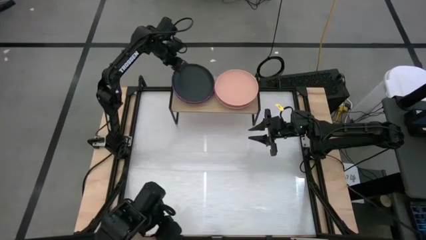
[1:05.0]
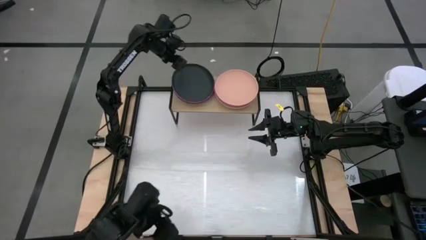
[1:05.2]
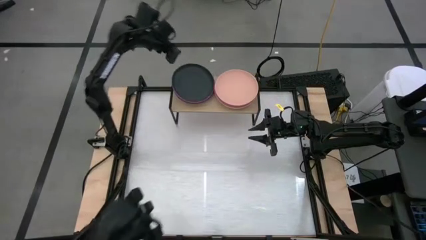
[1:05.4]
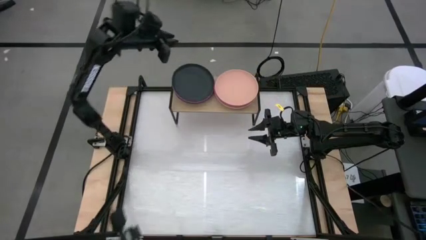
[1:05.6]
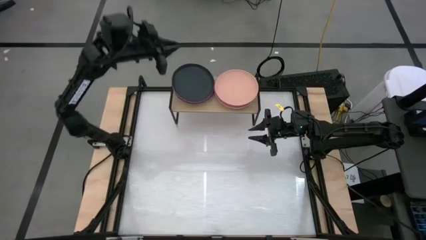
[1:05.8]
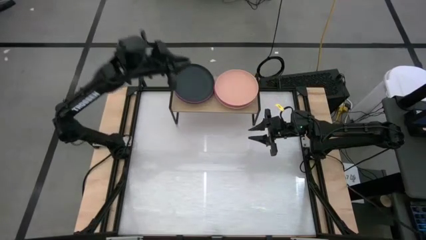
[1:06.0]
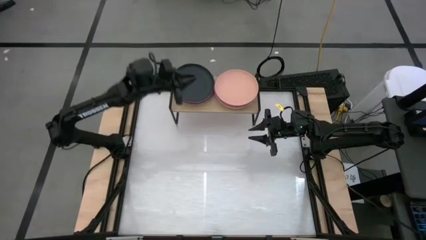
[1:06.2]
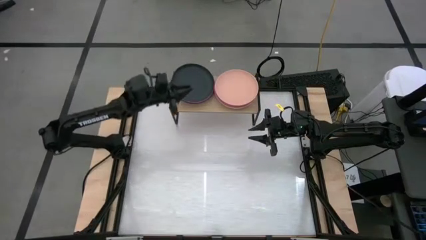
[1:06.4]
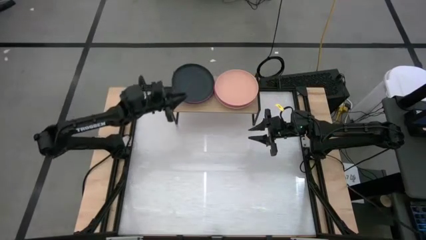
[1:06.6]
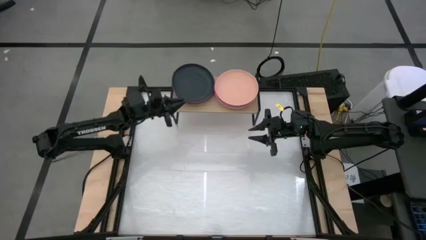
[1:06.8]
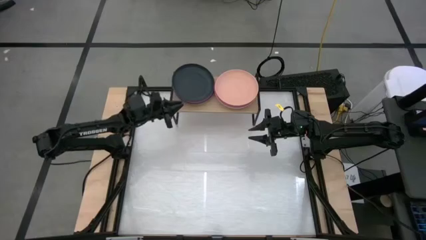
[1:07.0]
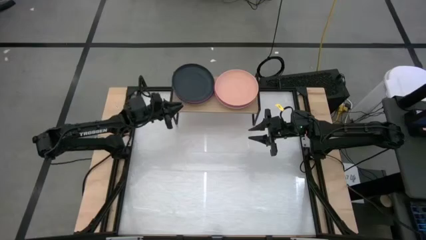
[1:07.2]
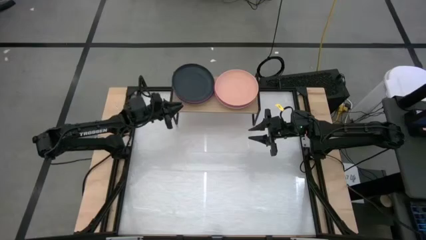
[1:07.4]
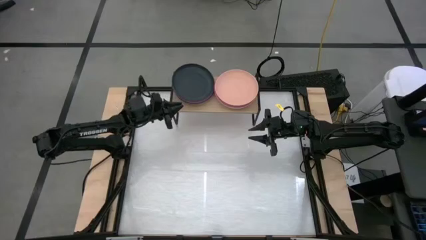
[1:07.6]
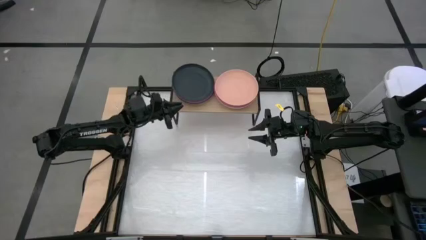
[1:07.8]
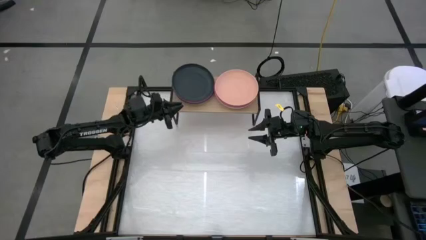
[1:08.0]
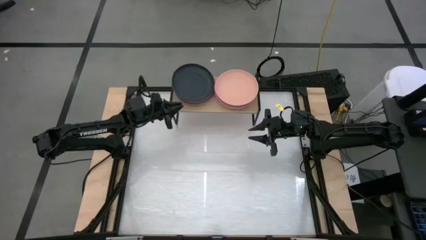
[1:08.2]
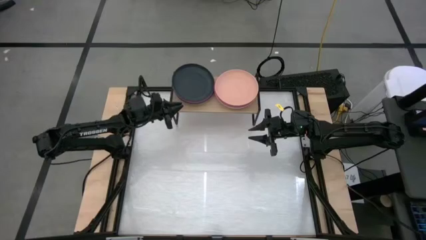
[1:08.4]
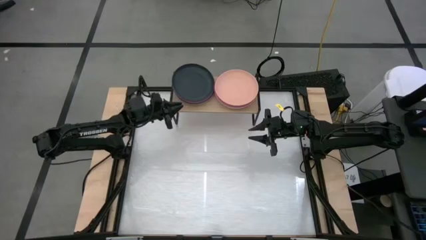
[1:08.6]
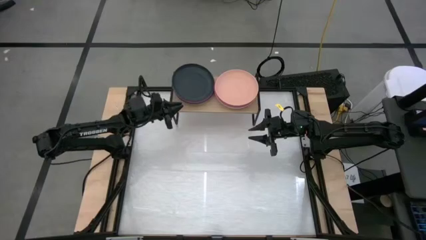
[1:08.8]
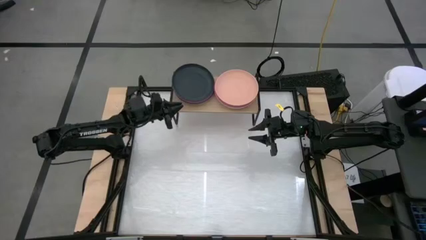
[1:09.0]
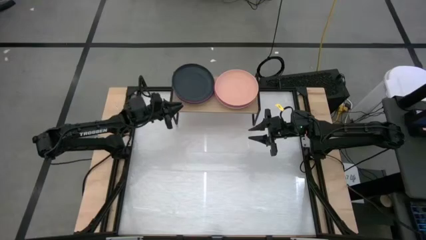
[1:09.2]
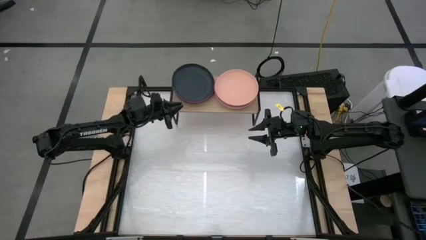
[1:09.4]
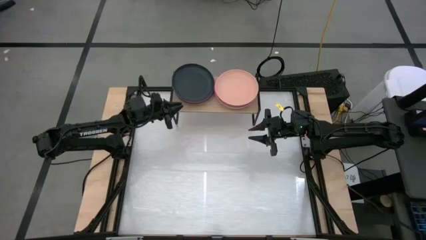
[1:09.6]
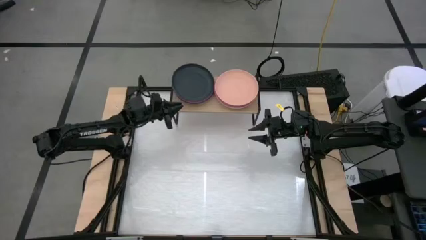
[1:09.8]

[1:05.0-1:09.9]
Task: Place and stack plates onto a shelf
Return to Home Position

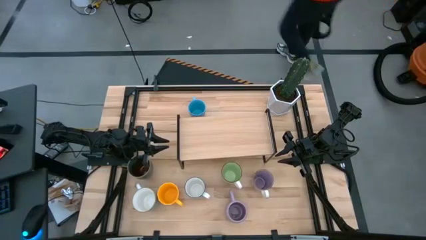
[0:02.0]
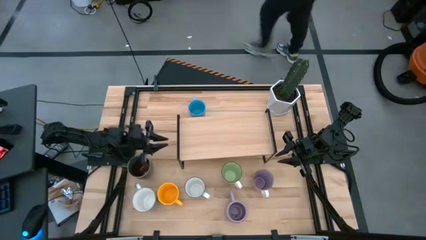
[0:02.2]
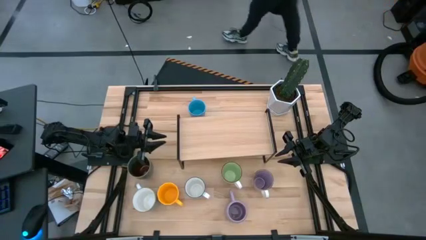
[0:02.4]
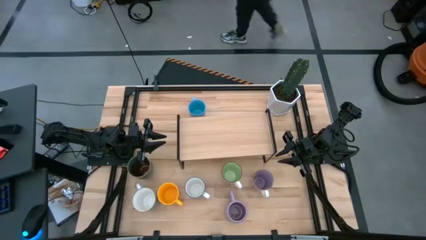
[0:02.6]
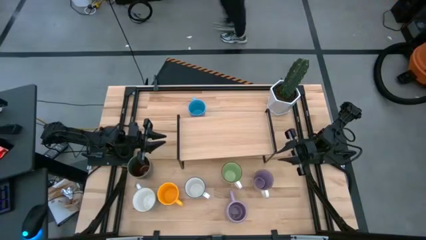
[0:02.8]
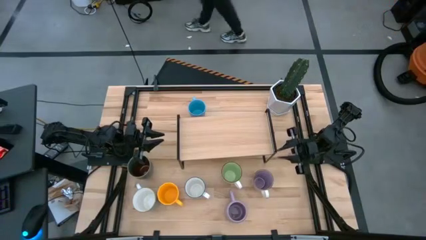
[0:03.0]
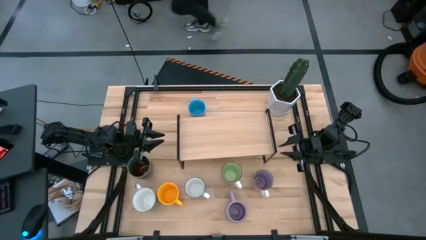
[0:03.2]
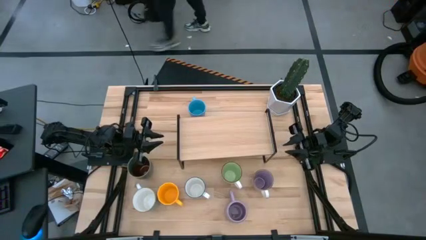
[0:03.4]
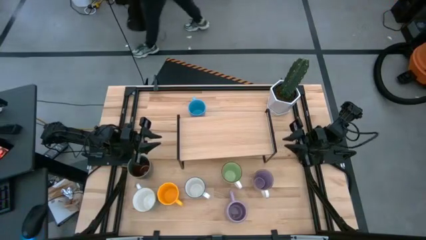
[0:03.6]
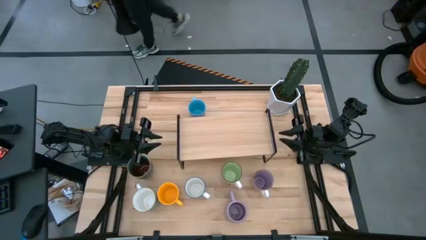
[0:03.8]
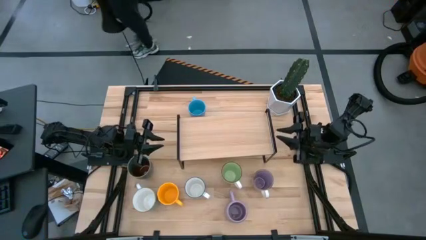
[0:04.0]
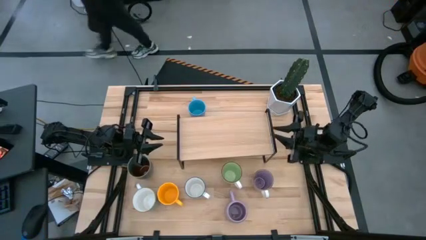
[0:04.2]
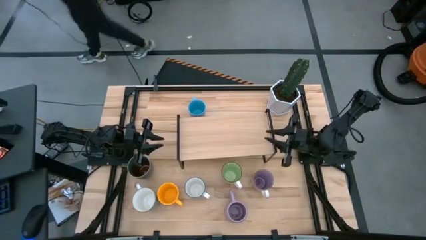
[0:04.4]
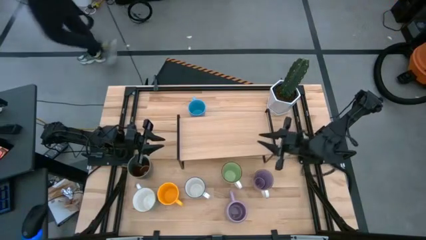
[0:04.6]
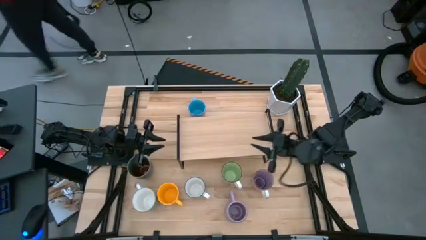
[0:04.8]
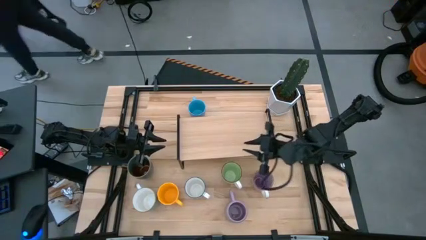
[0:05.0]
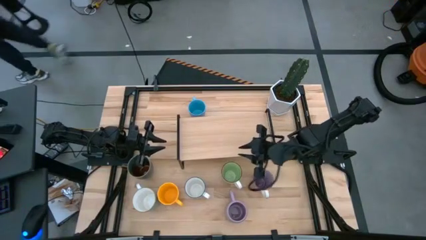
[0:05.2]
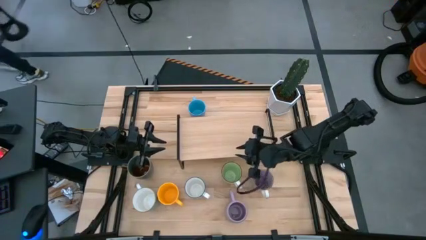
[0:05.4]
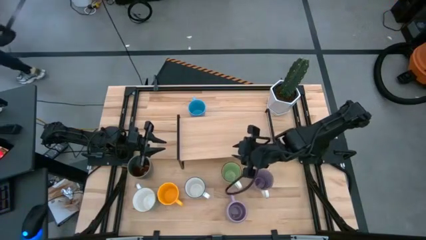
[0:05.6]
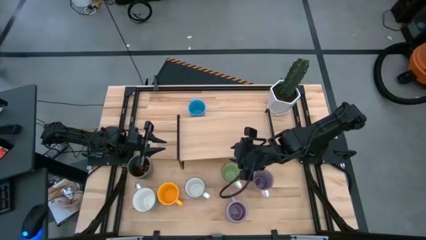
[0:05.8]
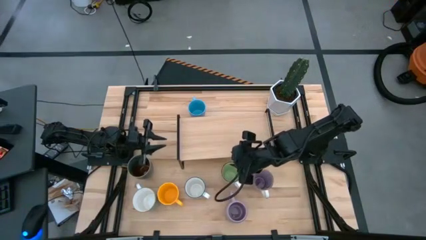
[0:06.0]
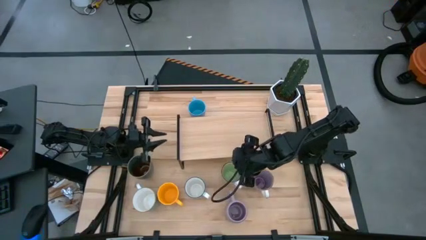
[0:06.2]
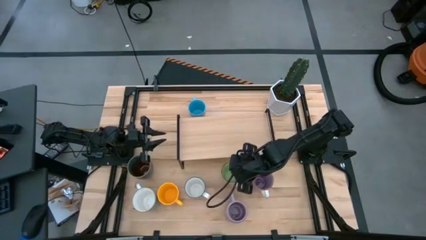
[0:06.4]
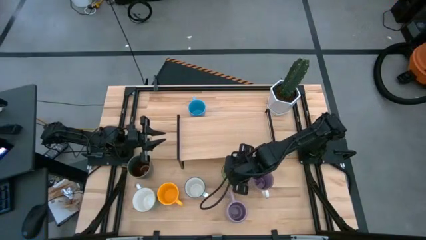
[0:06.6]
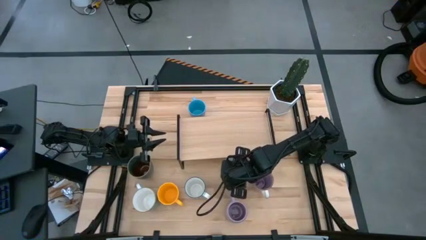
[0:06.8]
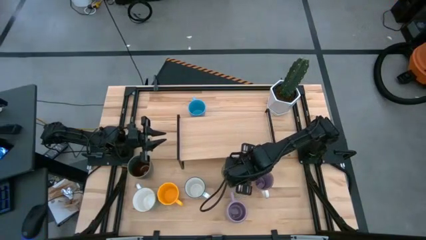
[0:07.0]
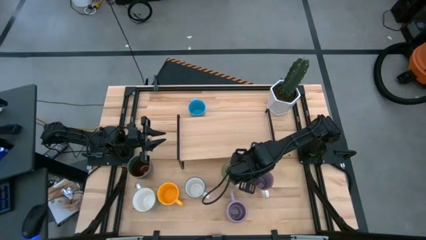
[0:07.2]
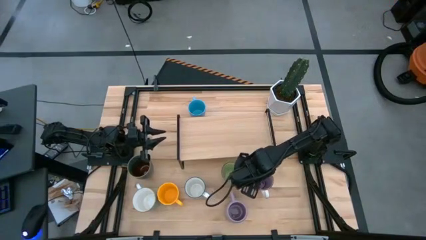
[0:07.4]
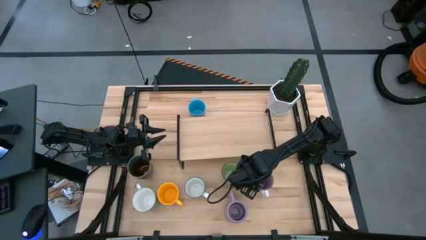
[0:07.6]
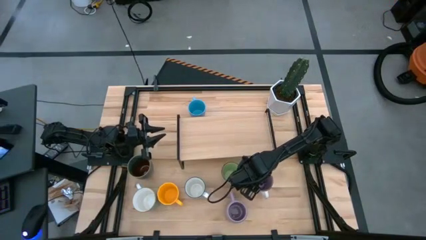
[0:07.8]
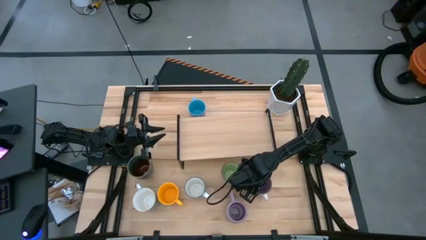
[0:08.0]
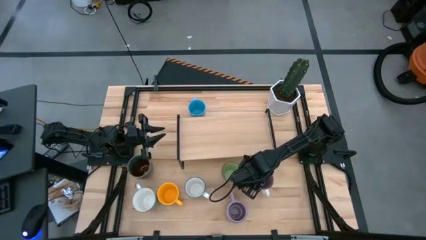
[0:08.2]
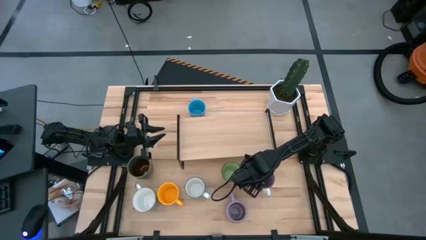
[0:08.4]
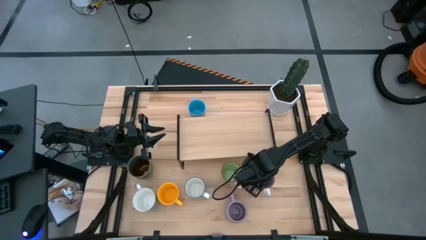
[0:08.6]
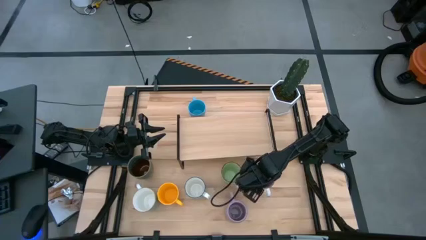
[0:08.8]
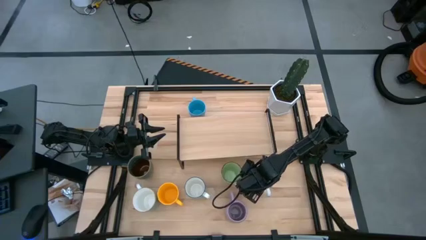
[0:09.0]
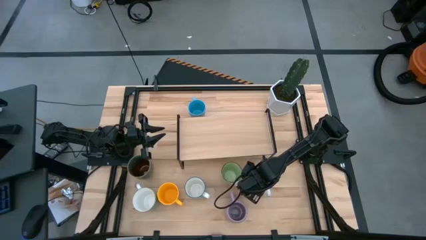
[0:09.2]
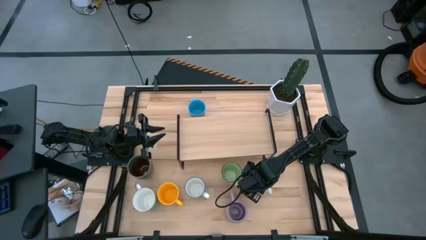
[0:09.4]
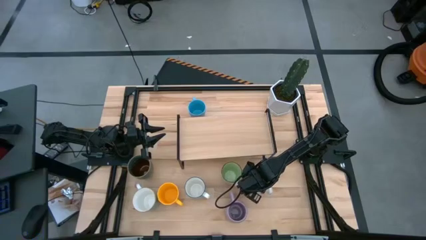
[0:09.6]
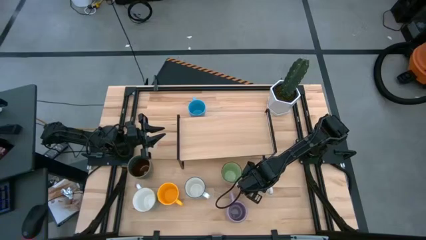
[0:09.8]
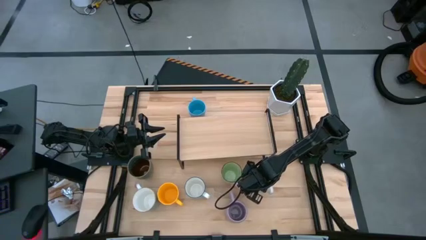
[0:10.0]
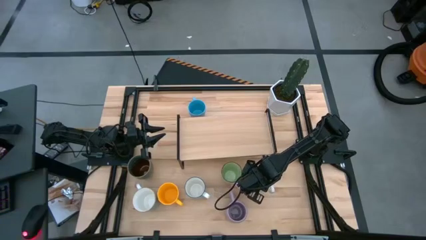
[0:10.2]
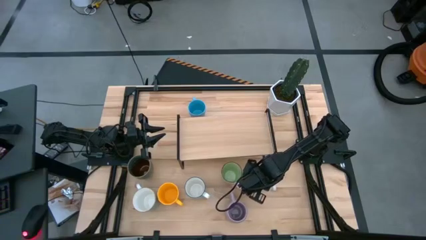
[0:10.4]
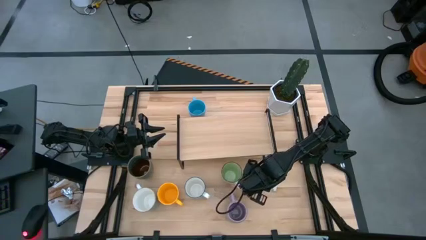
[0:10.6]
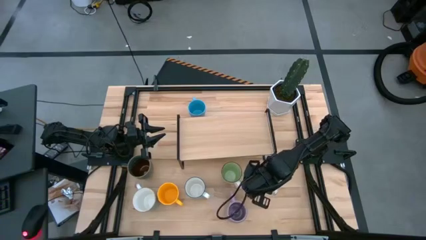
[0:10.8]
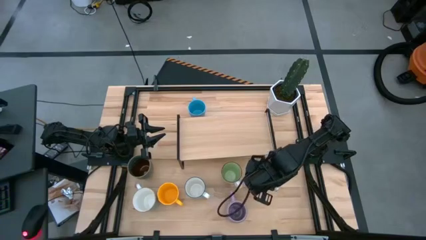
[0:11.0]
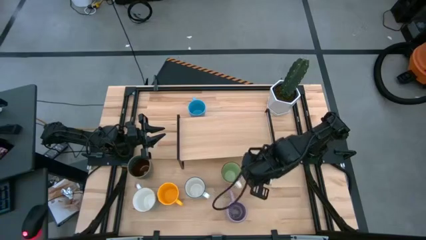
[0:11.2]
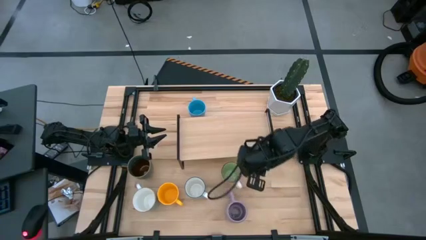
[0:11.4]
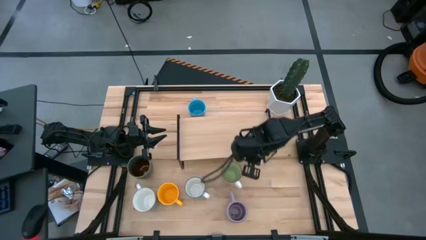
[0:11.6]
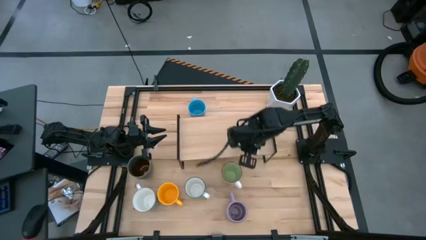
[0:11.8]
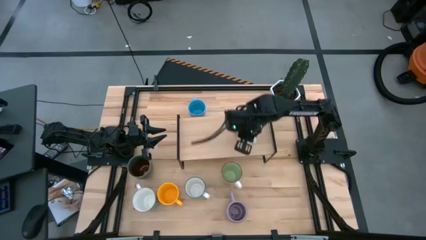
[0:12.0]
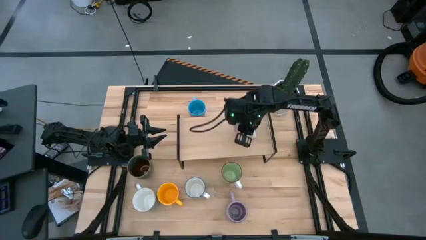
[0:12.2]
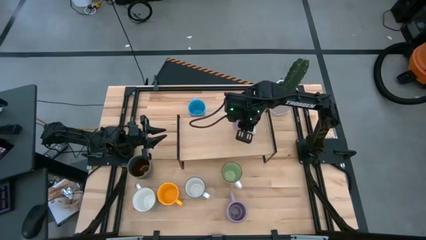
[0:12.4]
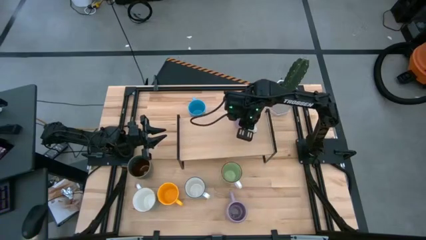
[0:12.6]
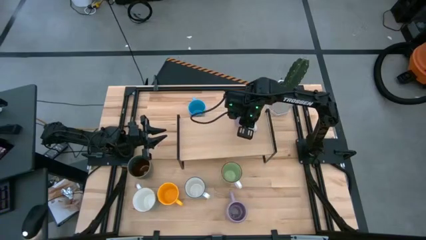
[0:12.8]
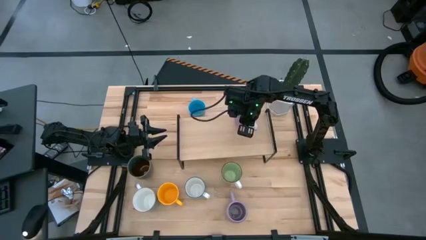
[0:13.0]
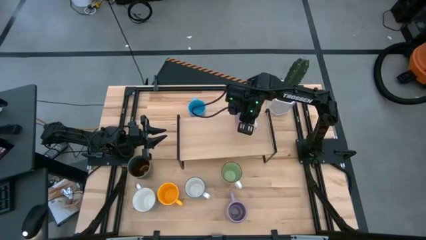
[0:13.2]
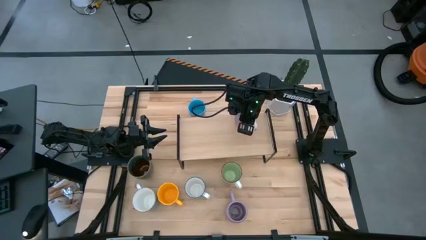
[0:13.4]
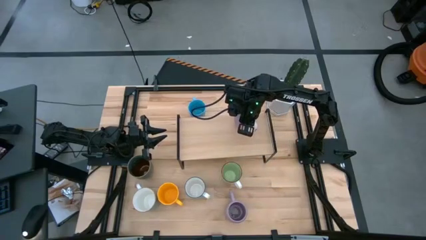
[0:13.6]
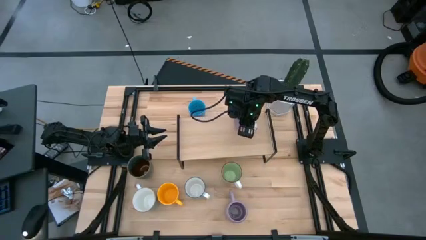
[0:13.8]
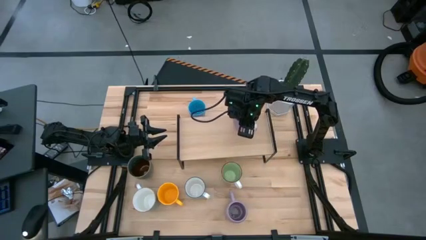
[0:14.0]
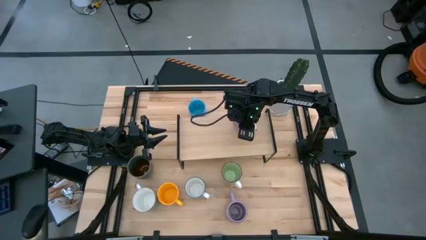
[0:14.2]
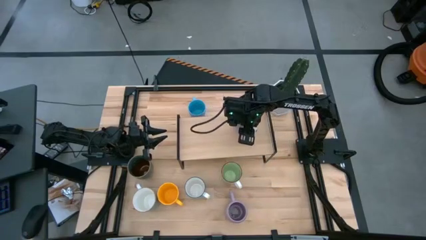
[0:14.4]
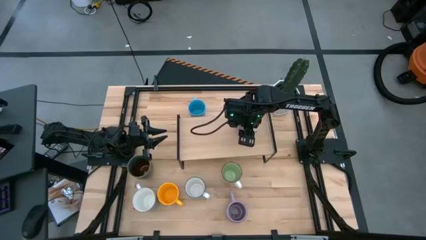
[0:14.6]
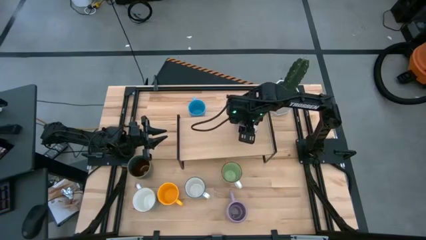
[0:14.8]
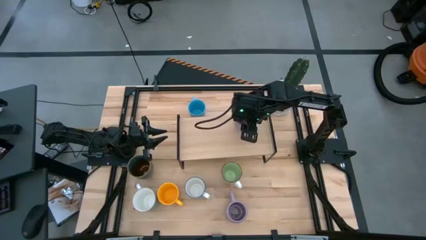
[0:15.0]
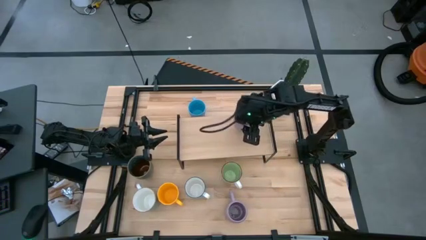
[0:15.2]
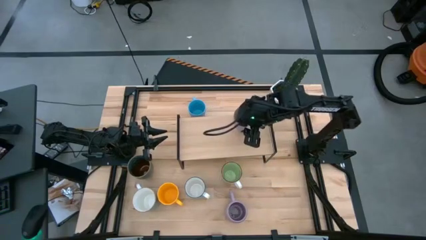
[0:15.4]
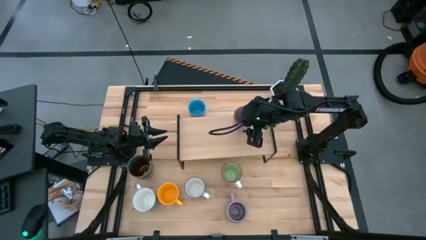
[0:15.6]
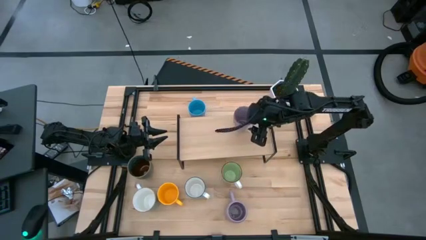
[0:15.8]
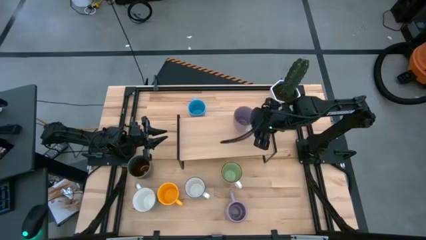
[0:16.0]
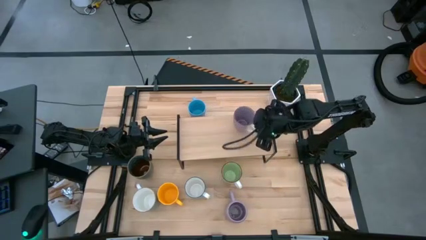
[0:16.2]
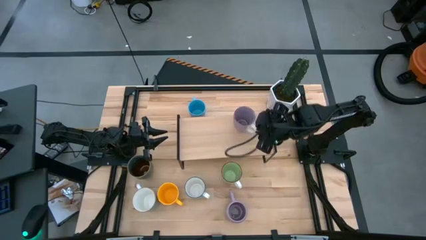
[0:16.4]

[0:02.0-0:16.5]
Task: Place coffee mugs
Put the violet-white mug on the shelf
